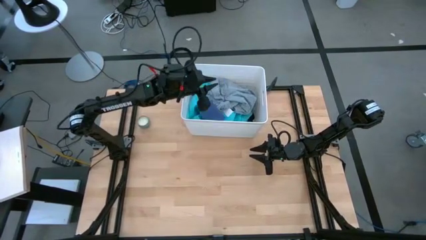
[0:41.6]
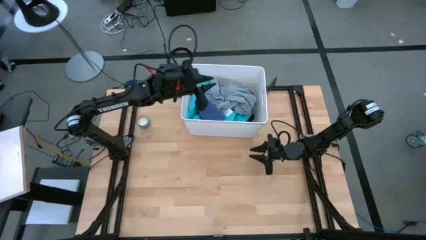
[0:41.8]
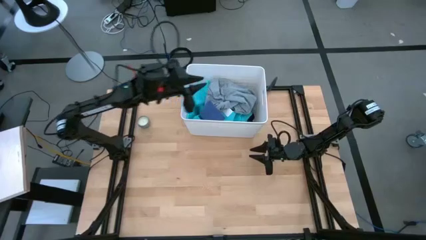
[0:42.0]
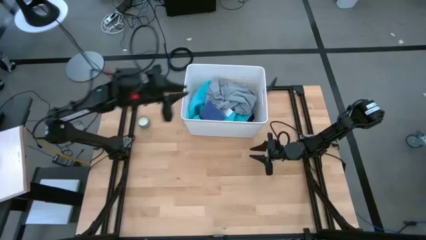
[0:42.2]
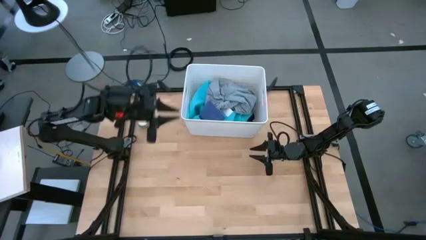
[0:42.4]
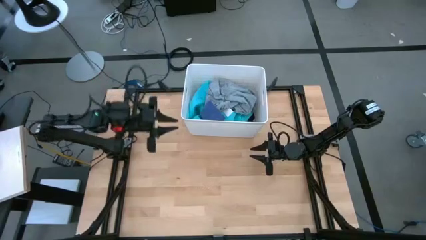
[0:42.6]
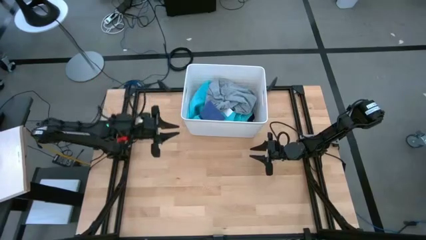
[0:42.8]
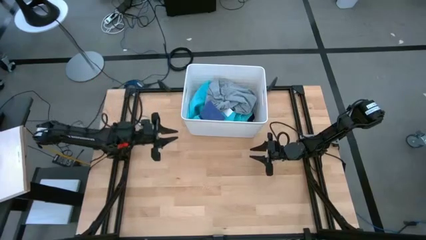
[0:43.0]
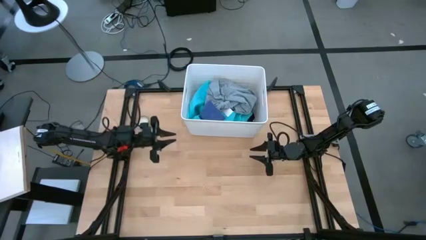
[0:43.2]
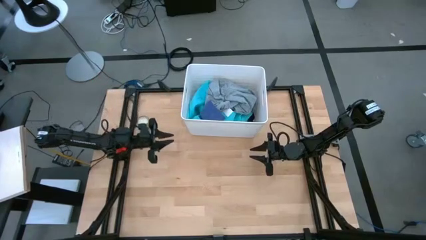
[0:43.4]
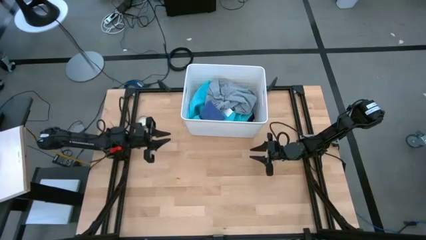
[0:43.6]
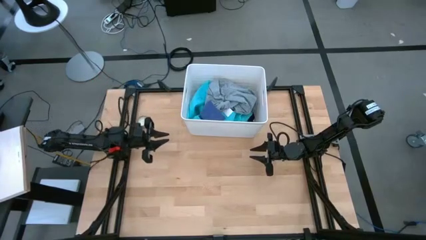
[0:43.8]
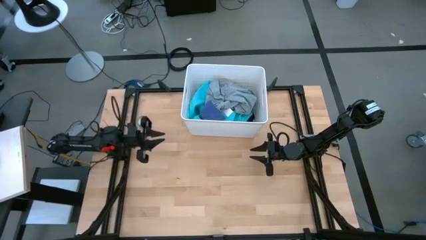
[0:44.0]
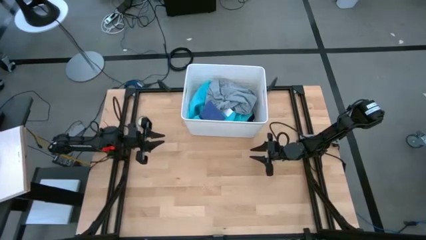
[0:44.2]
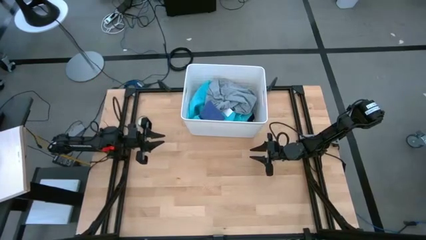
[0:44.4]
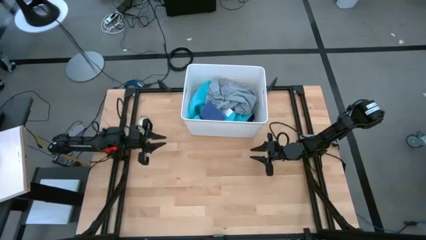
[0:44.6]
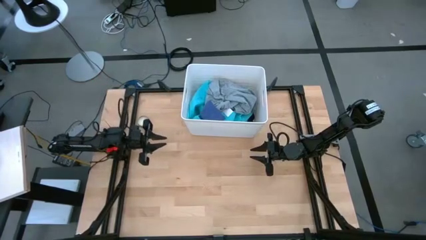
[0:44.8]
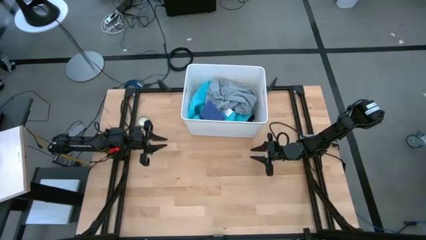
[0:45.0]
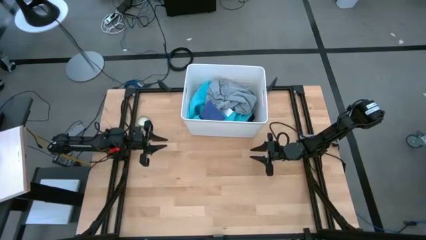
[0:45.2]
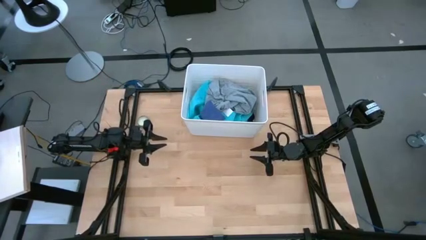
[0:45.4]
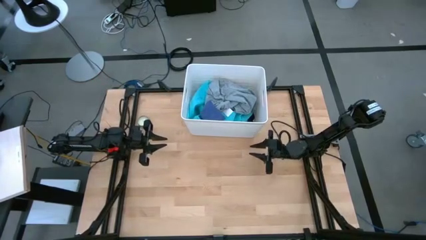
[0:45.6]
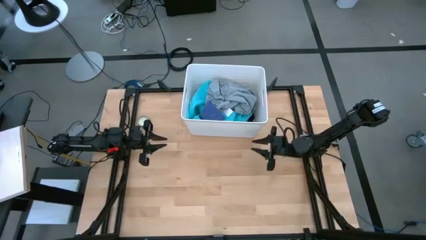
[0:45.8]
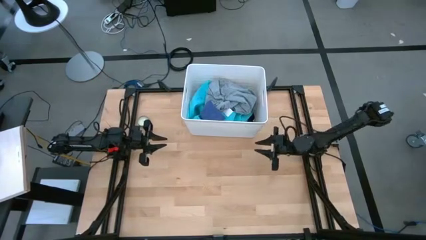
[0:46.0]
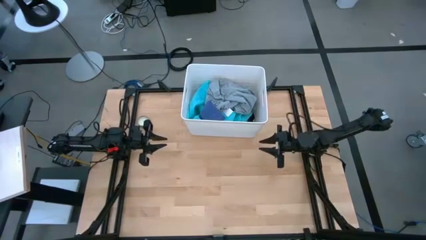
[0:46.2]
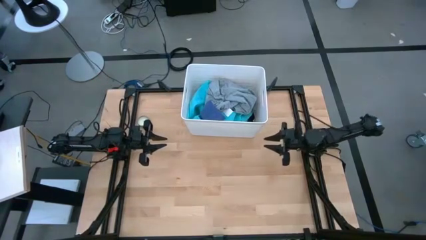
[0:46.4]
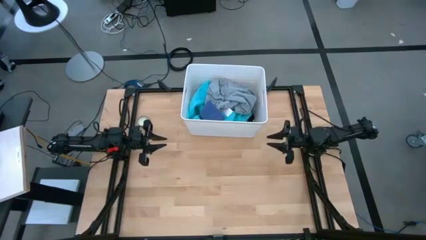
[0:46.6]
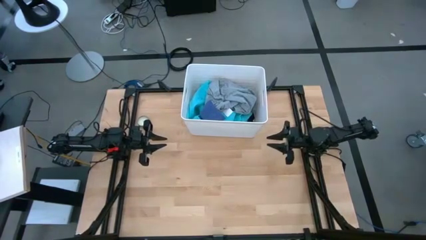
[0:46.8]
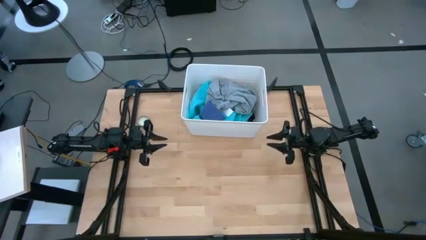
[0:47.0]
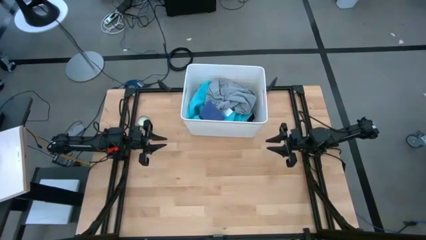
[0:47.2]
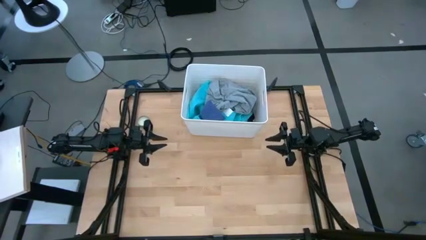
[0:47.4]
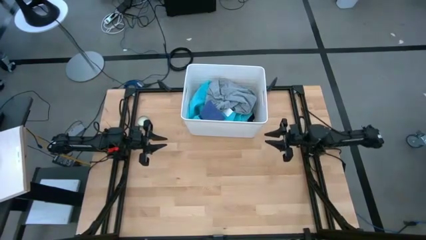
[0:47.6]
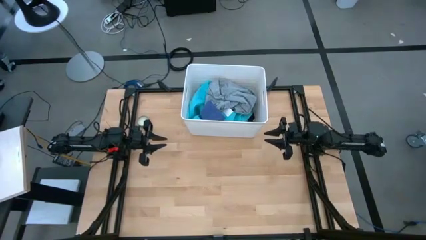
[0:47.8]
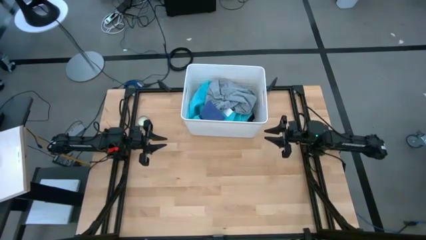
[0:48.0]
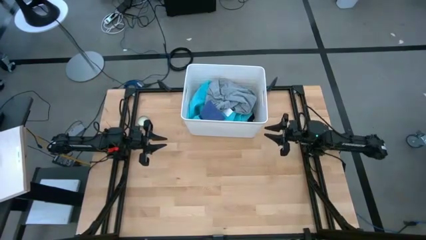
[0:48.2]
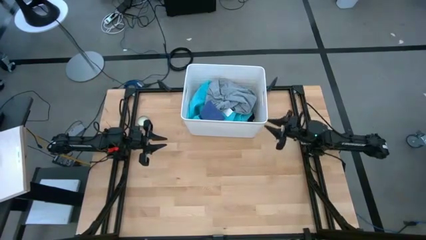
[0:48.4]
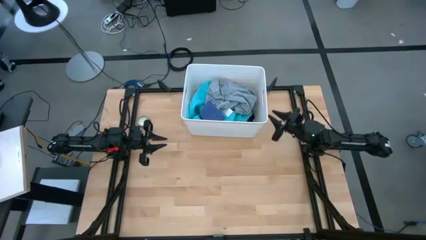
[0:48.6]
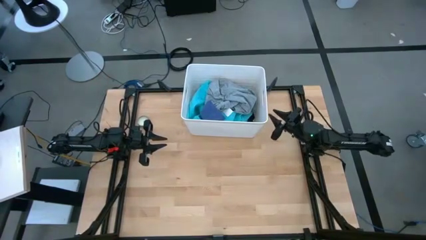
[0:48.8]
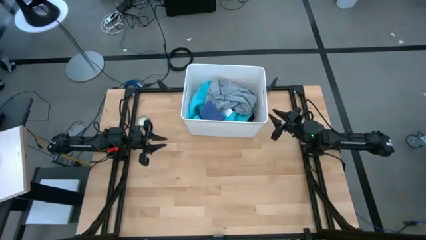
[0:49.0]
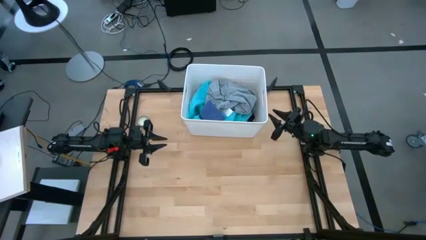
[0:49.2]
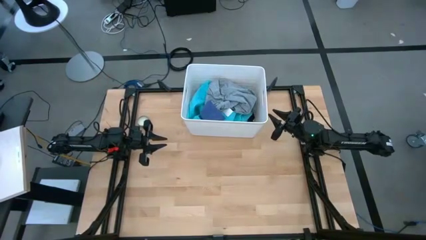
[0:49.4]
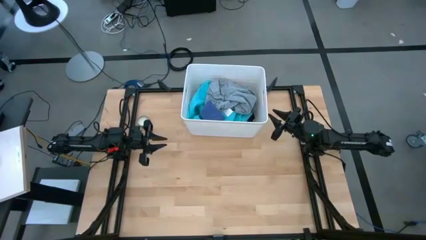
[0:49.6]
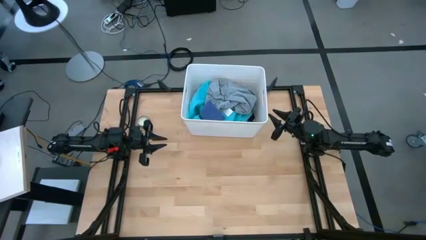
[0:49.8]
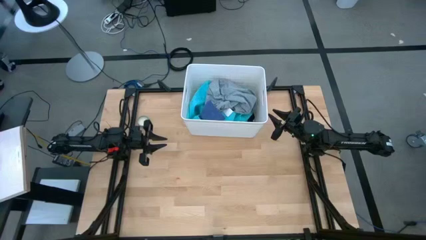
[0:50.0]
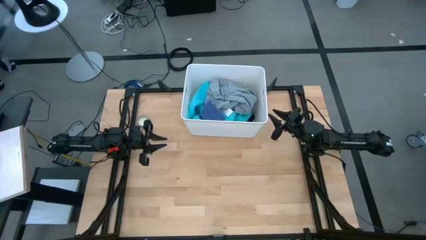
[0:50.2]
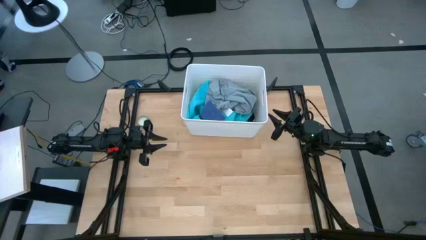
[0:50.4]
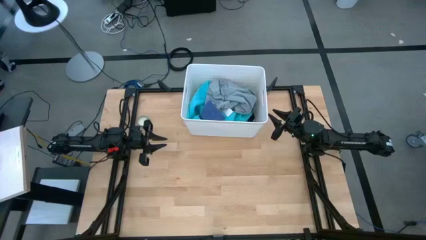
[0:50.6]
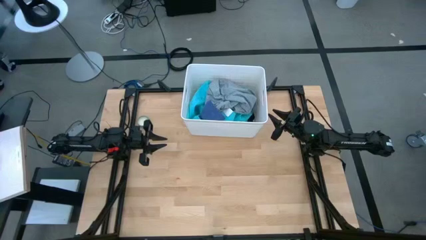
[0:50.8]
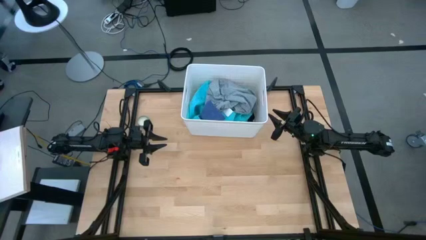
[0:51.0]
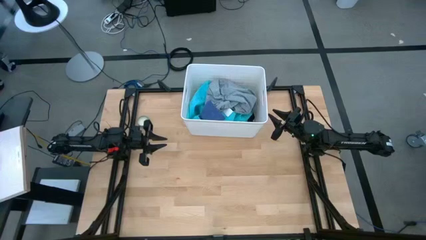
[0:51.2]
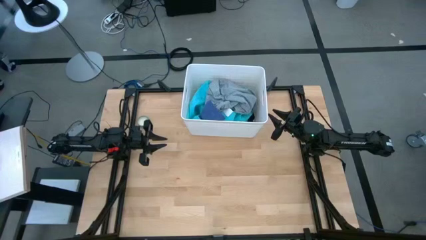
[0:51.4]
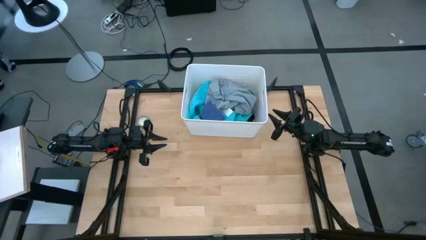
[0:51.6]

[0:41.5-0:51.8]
Task: Sort clothes
Return to Home Position

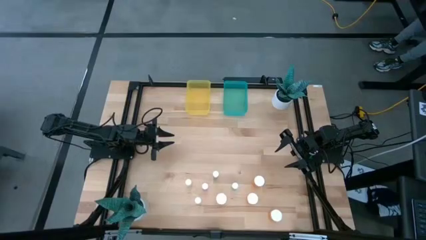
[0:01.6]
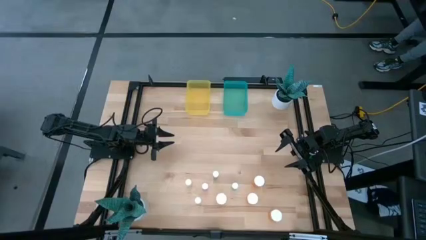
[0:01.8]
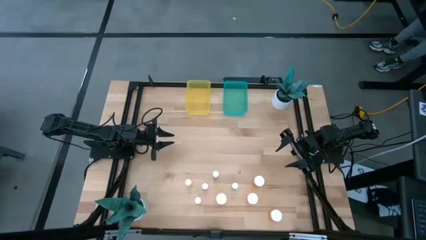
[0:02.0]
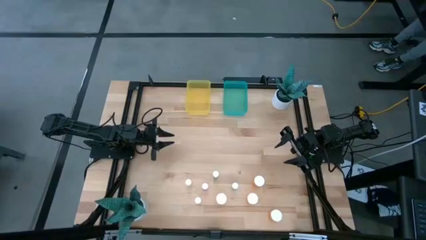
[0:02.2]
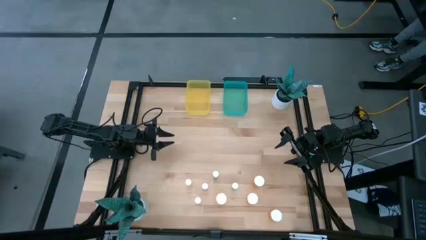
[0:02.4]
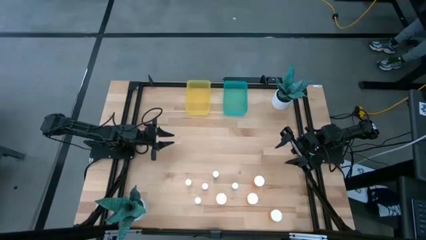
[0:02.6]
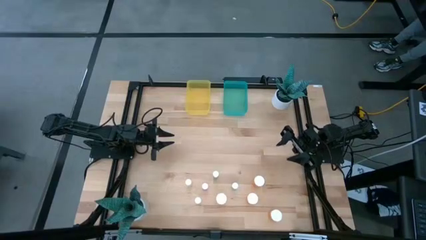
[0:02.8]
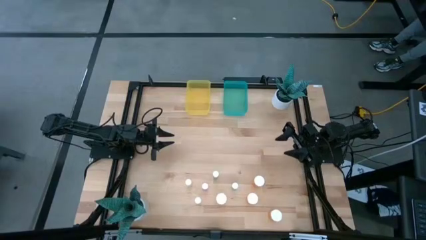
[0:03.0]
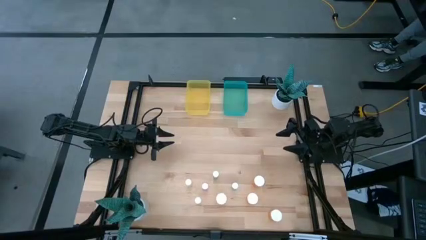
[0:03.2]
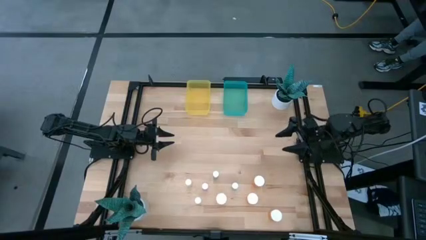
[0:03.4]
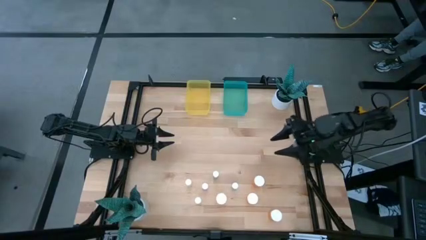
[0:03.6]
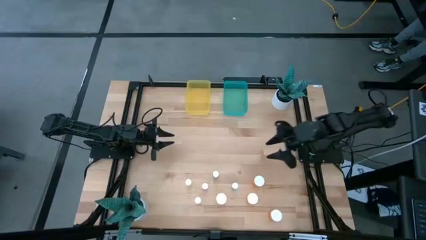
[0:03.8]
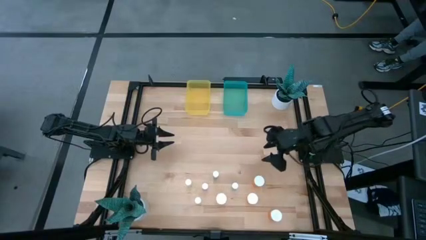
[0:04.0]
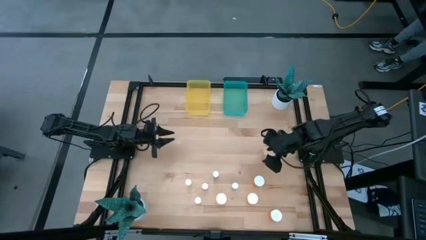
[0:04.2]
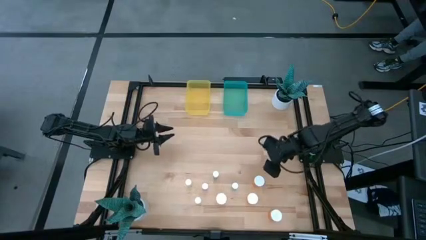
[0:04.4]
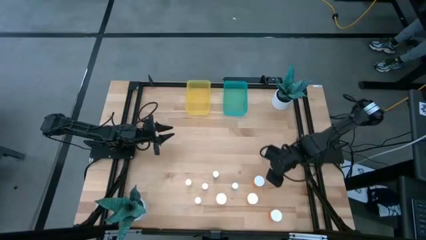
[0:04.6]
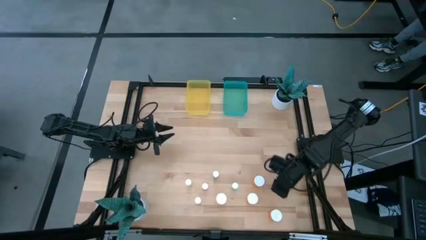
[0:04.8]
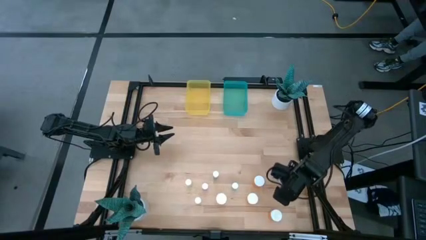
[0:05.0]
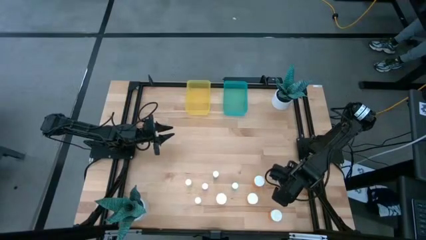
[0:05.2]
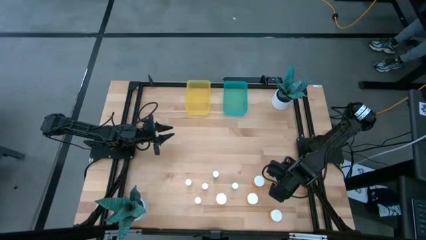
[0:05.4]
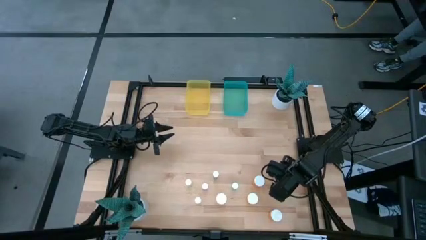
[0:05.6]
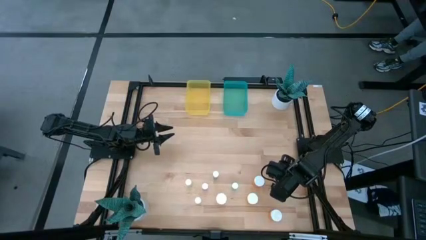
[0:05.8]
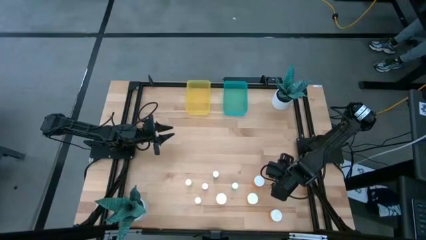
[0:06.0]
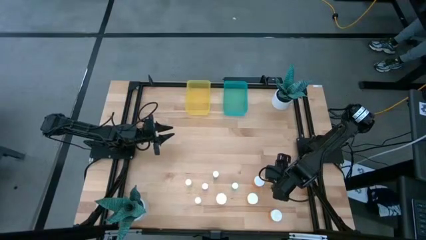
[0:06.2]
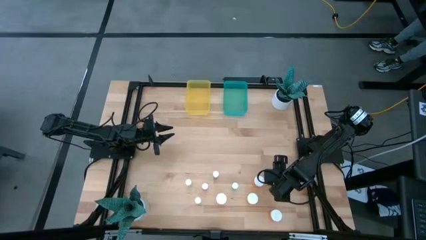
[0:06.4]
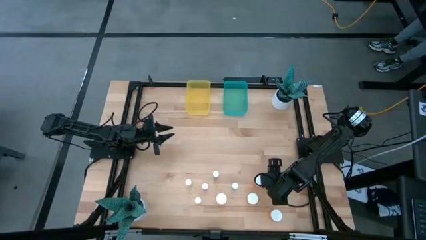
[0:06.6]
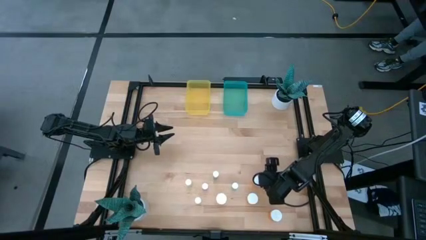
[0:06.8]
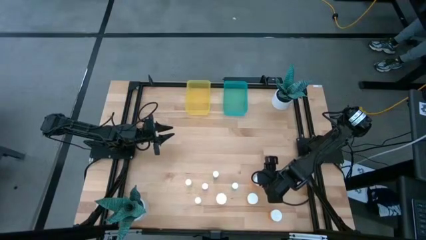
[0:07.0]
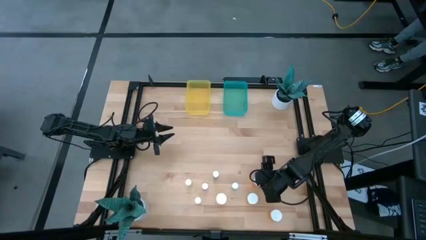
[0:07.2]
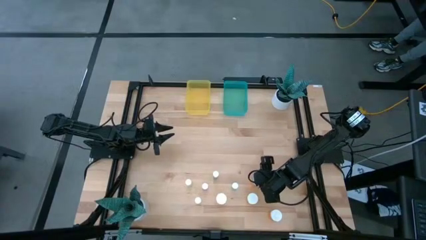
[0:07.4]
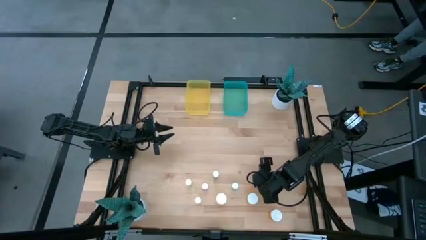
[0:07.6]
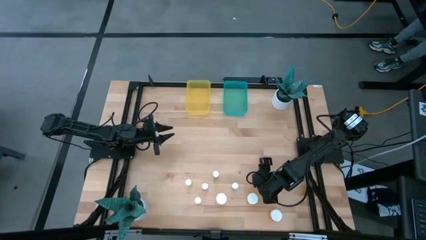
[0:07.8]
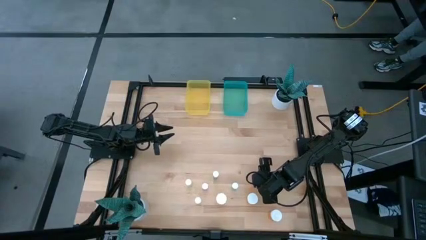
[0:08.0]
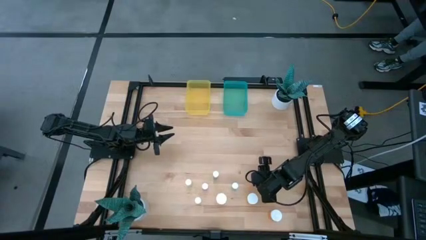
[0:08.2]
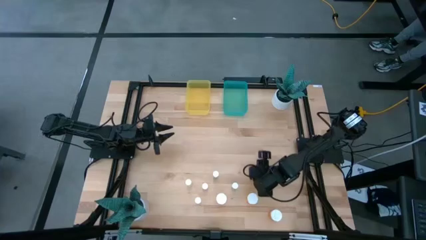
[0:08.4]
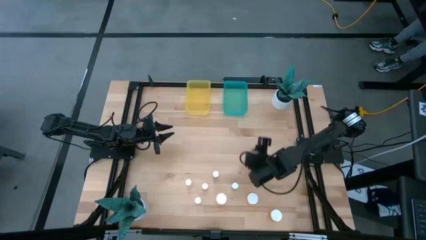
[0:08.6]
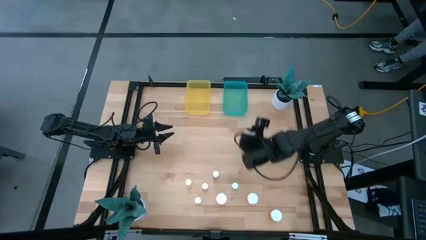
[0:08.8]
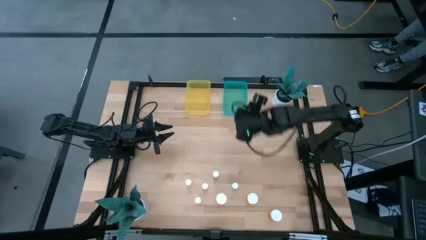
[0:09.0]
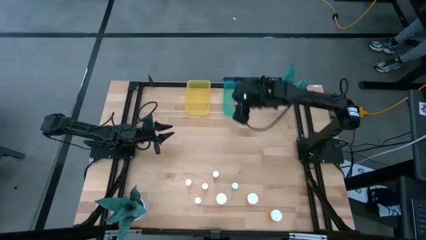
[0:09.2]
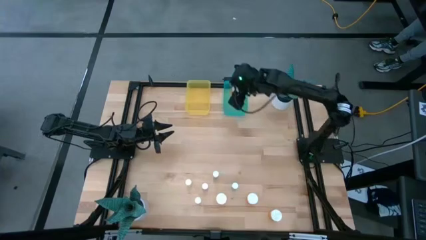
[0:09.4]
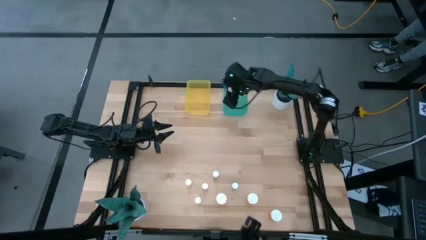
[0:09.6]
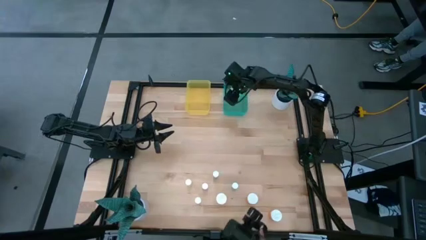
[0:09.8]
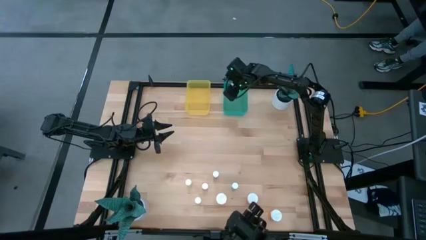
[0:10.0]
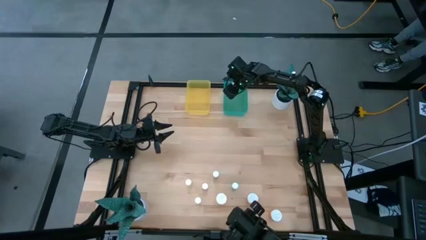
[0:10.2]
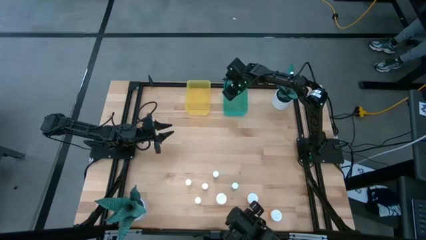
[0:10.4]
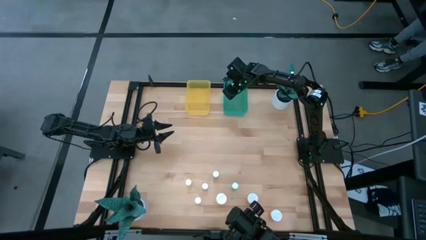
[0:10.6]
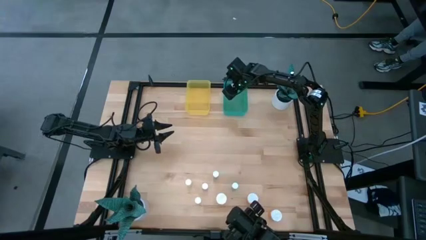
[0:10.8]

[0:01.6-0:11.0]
Task: Pick and place medicine bottles into bin by pill shape (circle, oval)
Put the orange capsule bottle into the green bin
